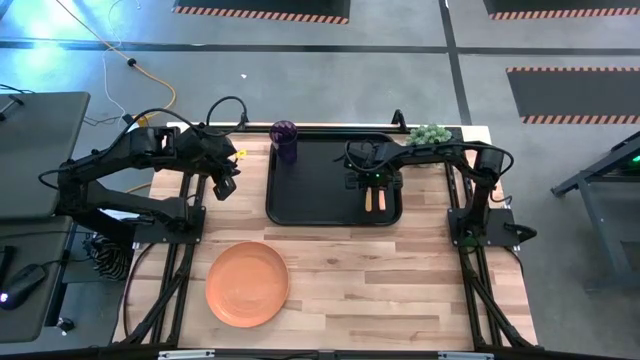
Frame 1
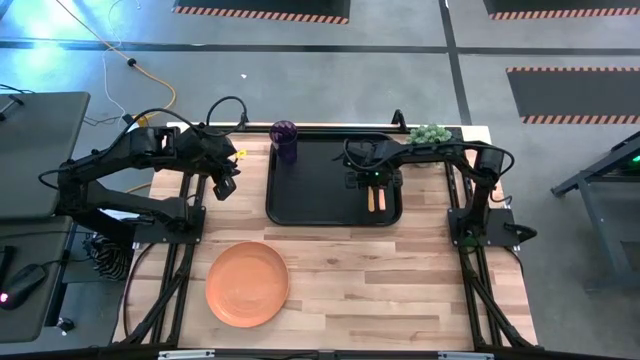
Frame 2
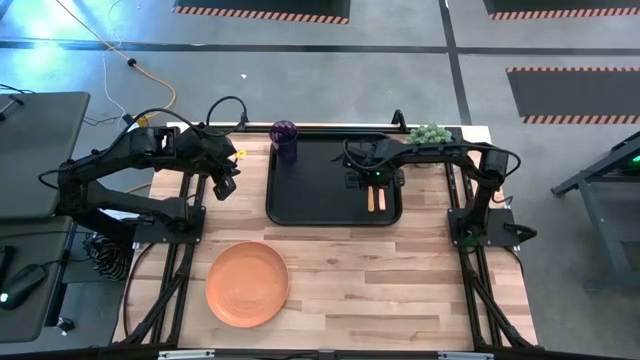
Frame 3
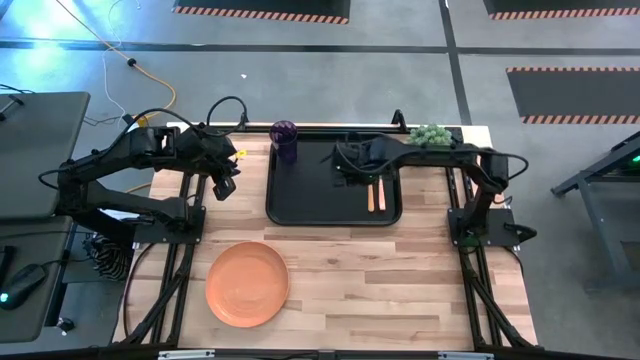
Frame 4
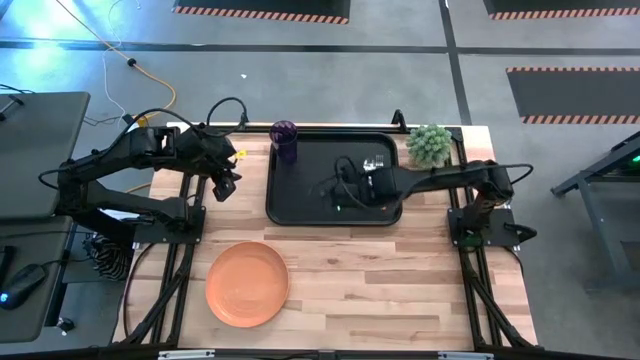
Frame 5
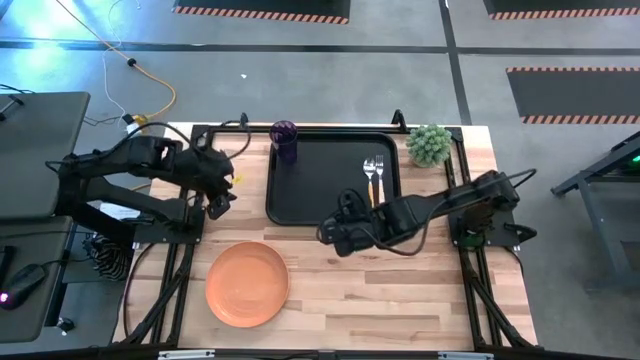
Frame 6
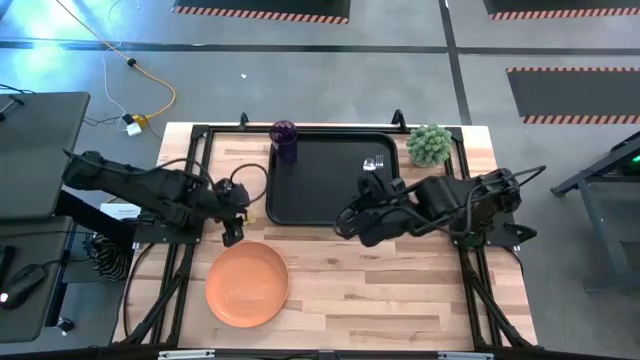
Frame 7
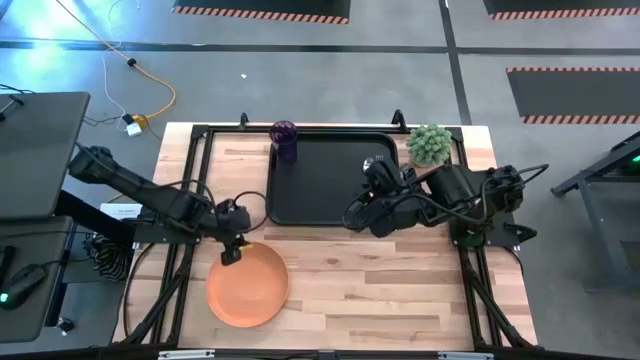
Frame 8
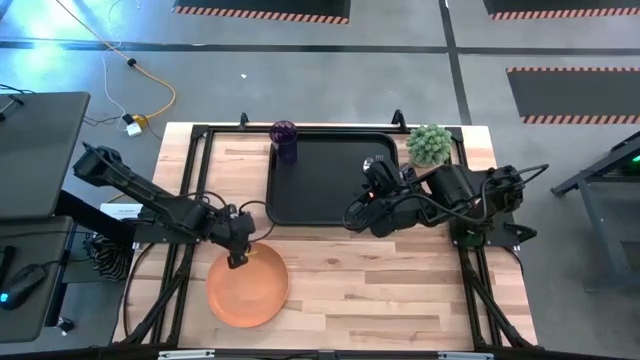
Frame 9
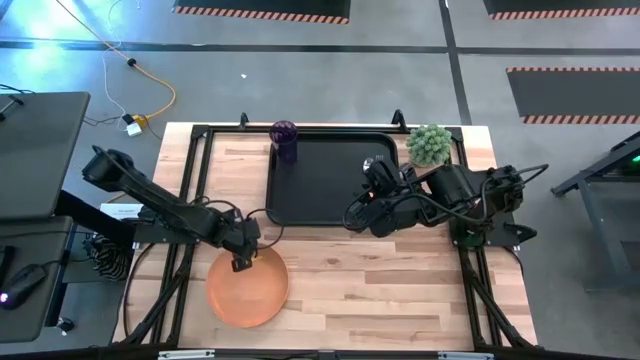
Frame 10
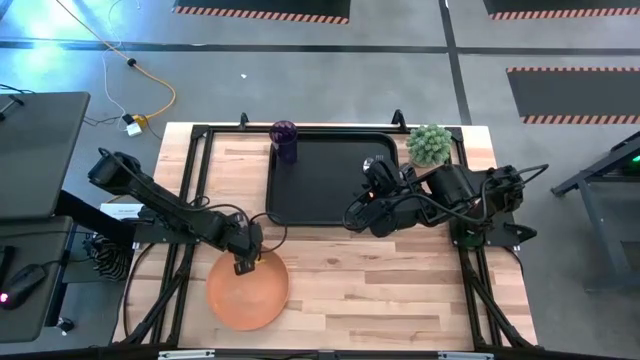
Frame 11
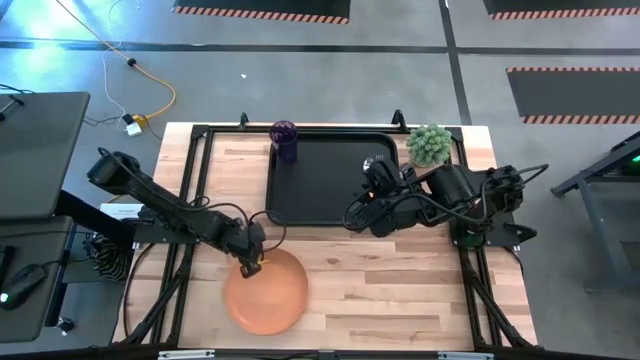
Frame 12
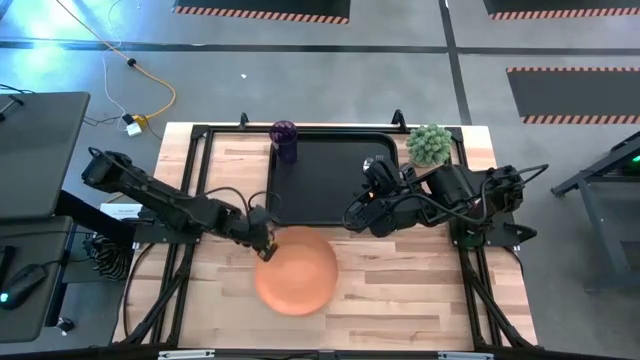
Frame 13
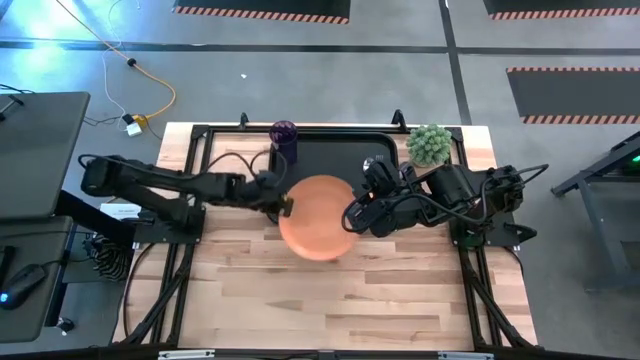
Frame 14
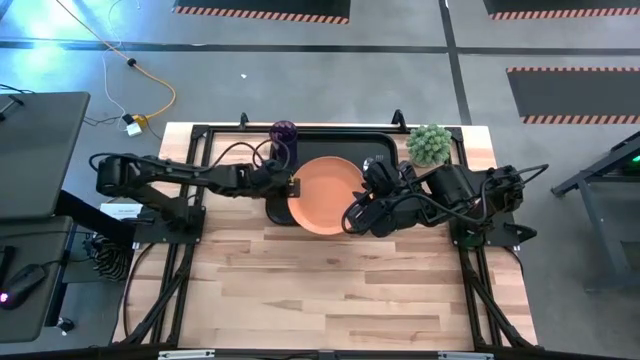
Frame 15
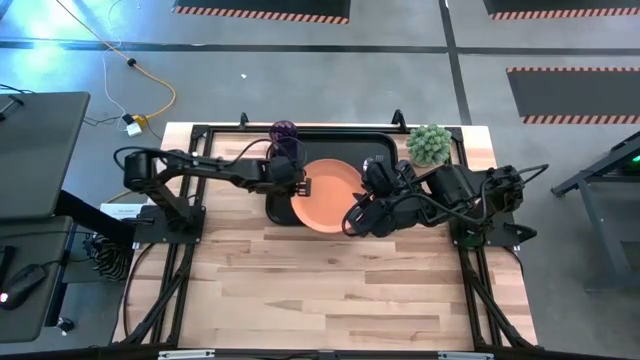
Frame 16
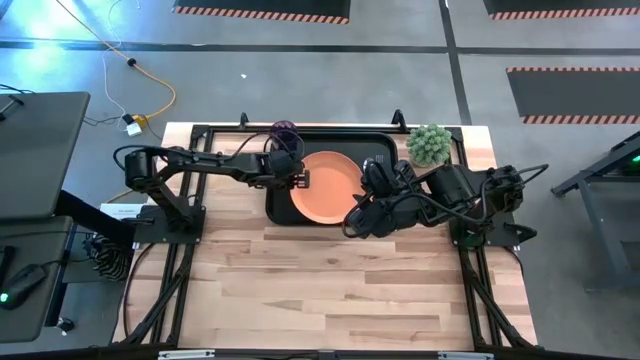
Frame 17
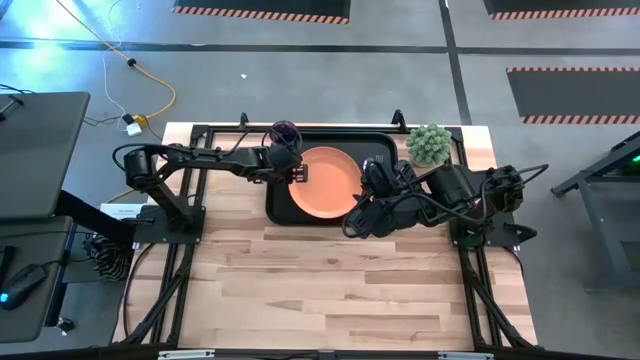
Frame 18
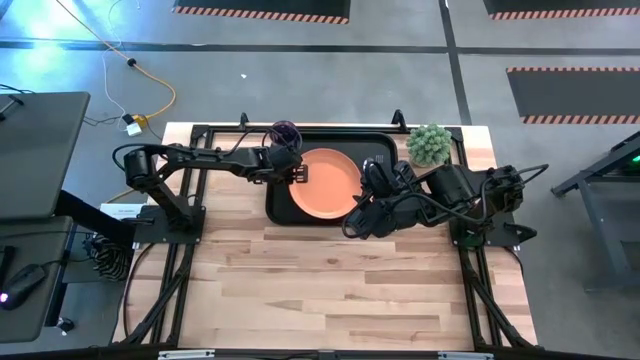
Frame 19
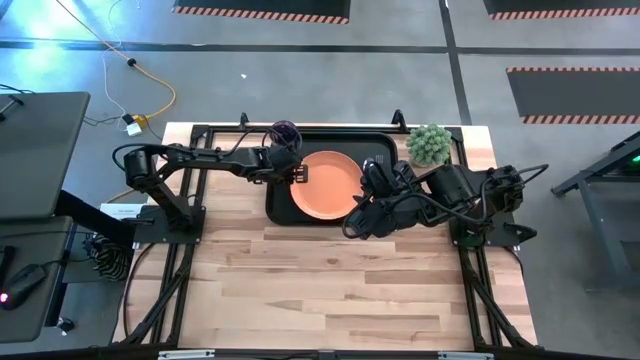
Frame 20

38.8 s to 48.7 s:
Task: Pick and place plate/cup/fork/spoon on tray
Put the orange plate to the left of the brown spoon on the tray

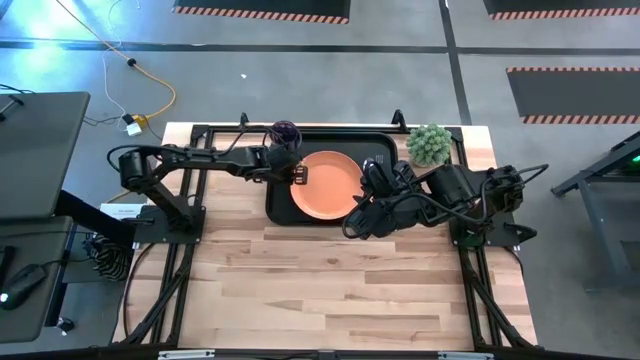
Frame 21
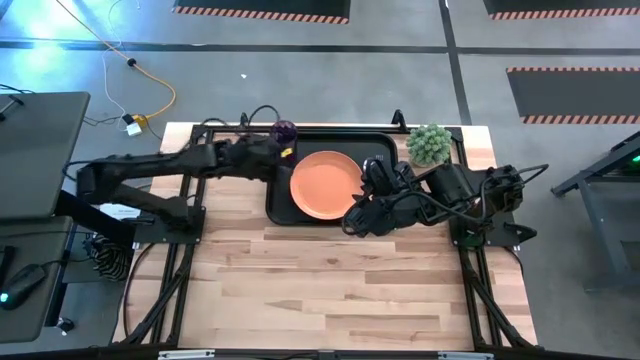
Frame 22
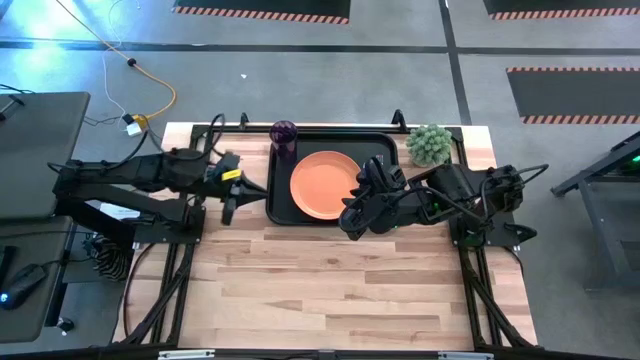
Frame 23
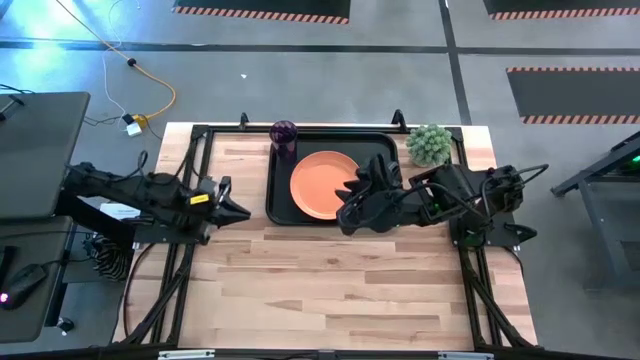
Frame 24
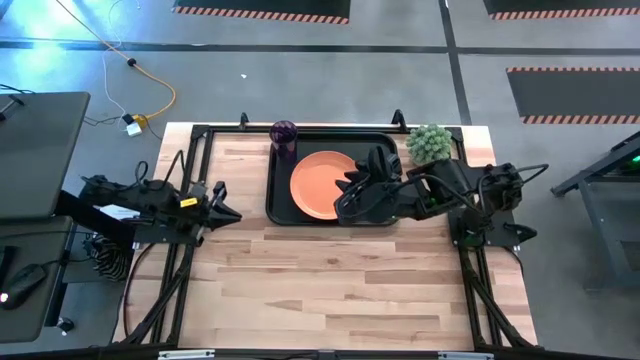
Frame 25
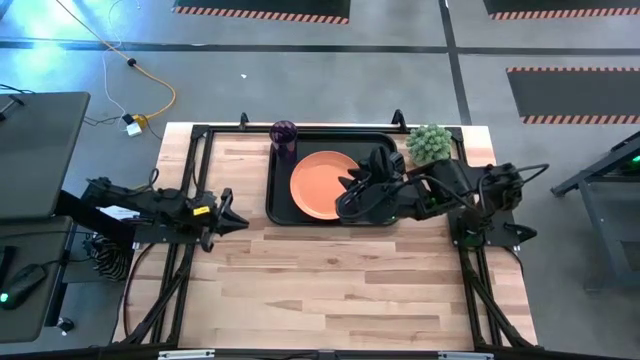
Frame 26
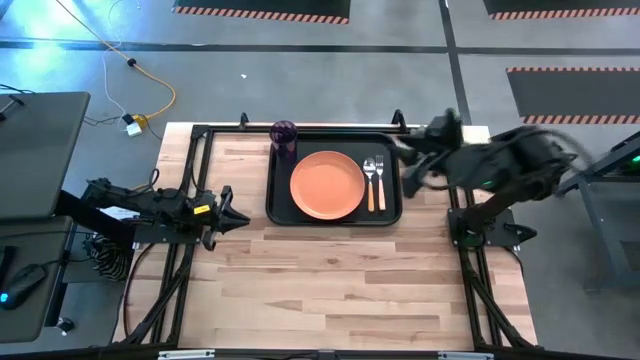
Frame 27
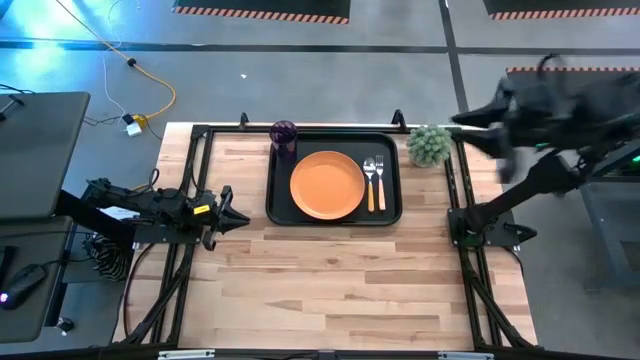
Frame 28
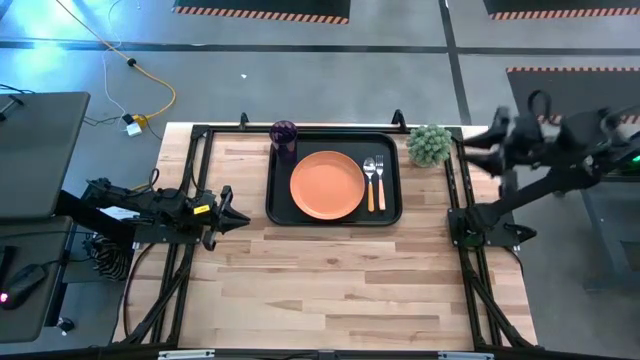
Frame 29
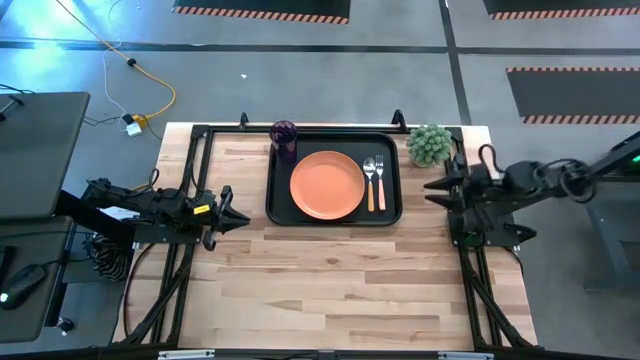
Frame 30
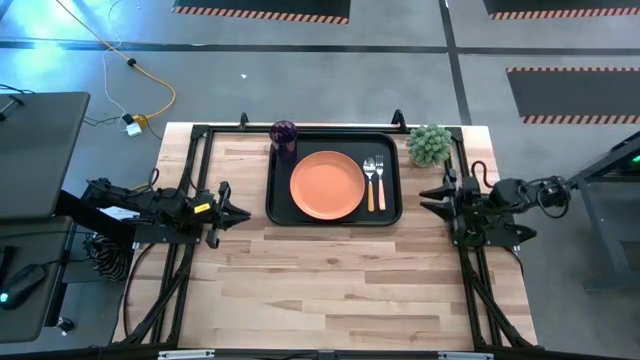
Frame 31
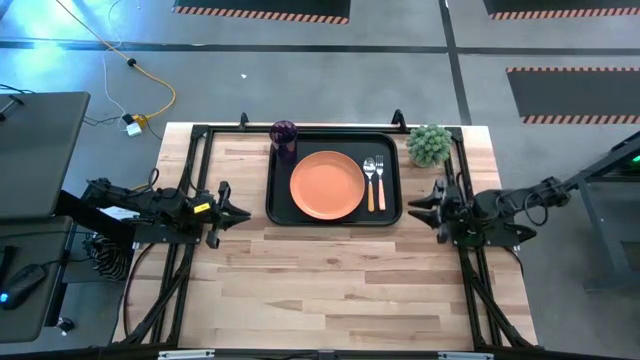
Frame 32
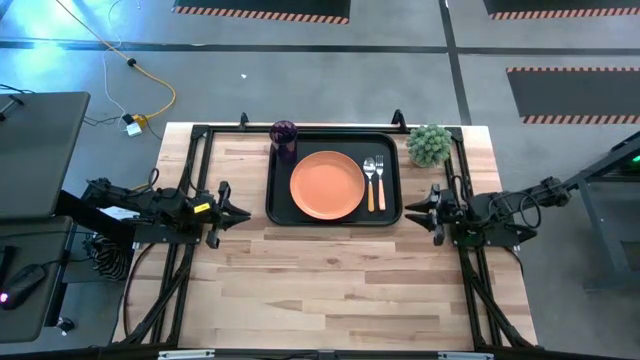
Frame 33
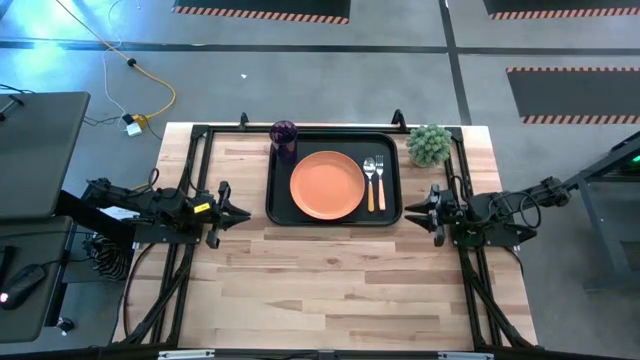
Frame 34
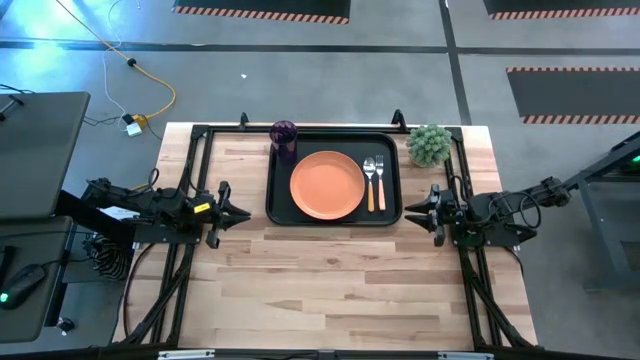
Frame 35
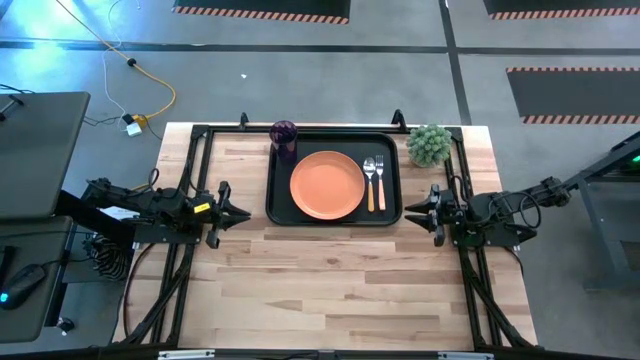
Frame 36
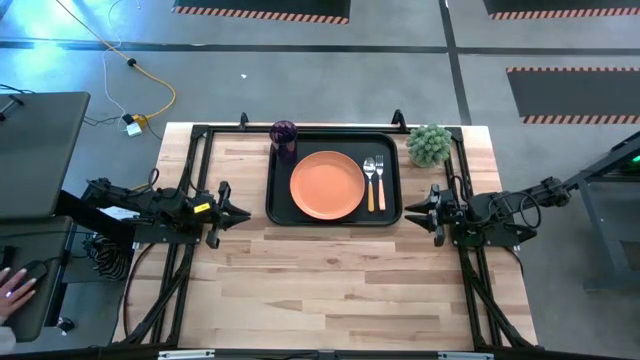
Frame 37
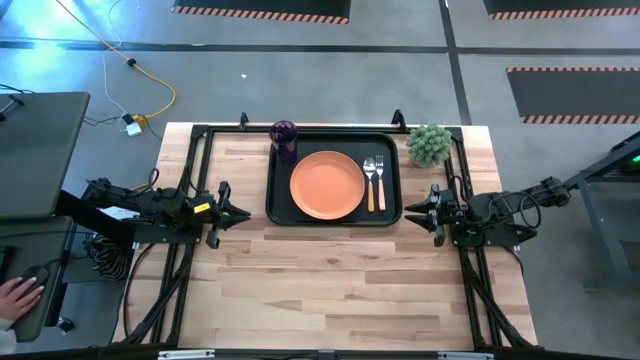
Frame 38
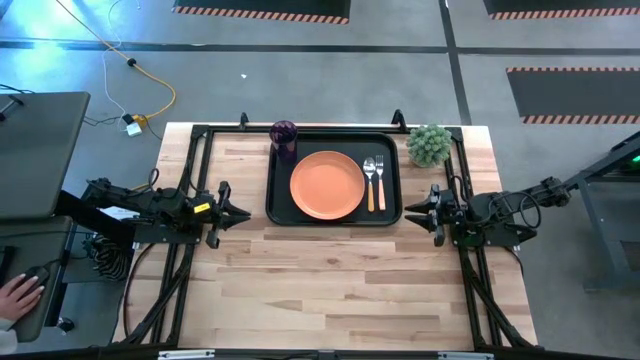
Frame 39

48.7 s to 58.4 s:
Return to Home Position

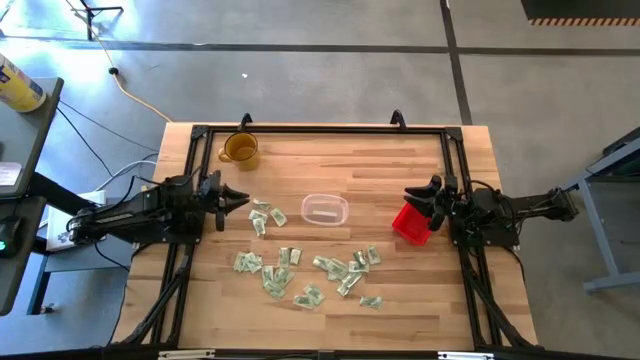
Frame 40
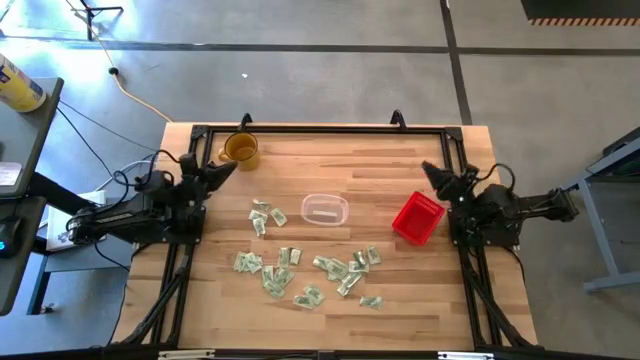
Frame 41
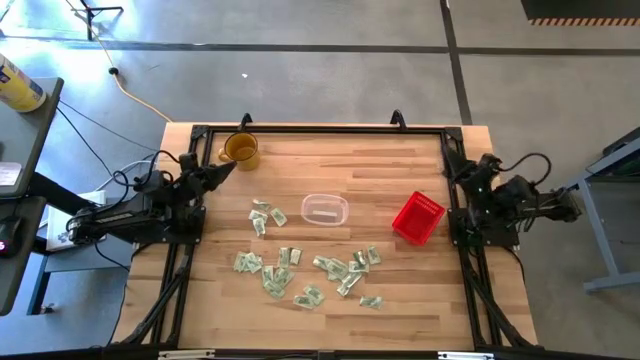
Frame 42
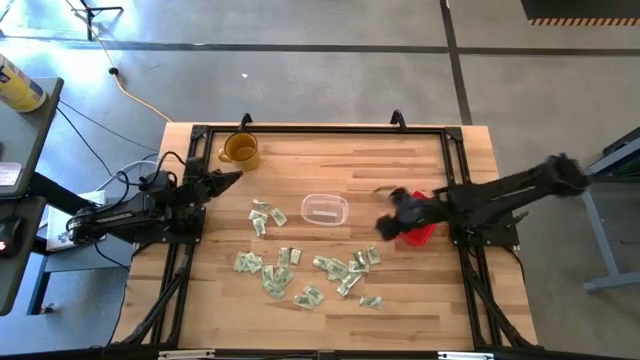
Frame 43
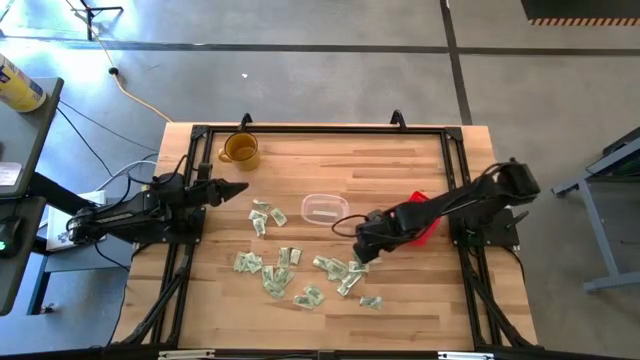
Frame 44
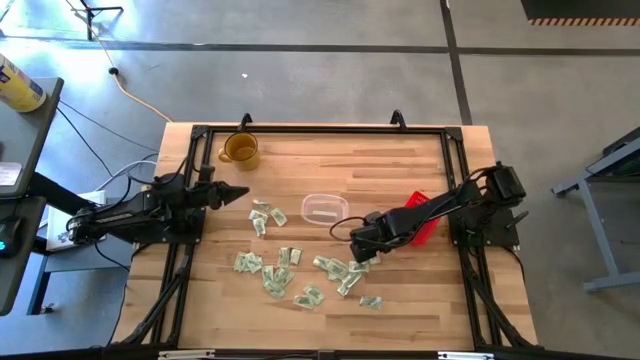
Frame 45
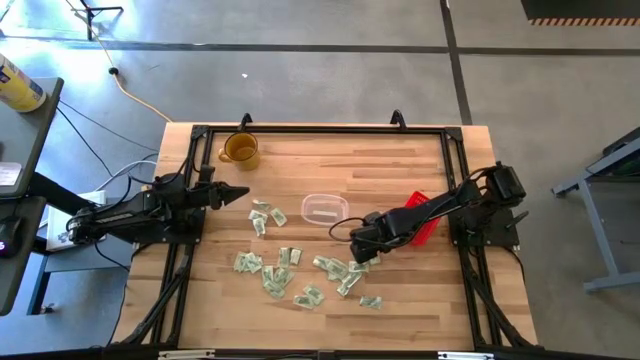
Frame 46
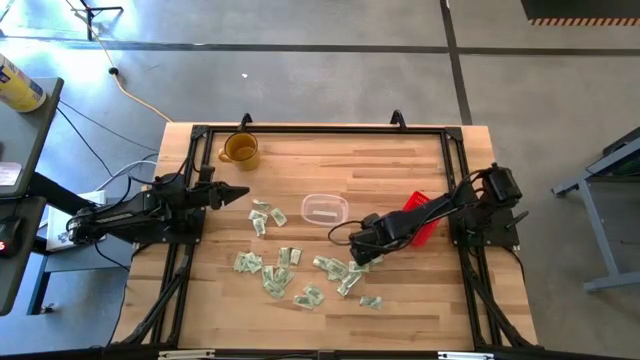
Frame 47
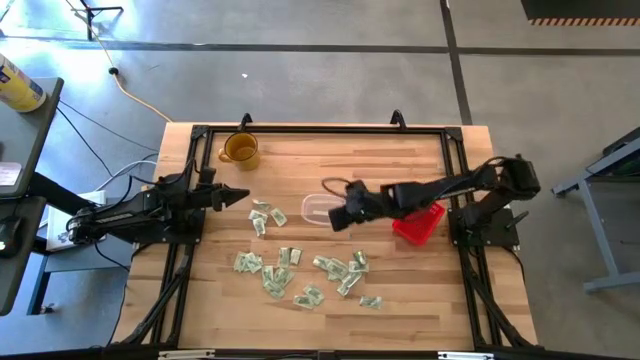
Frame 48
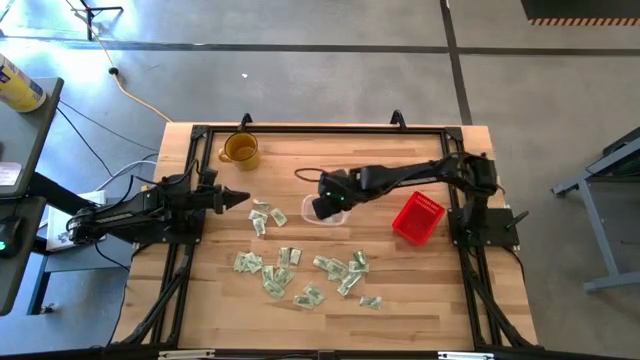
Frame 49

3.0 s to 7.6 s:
Task: Pick and place items into bin
Put the white stevia packet into the transparent bin
